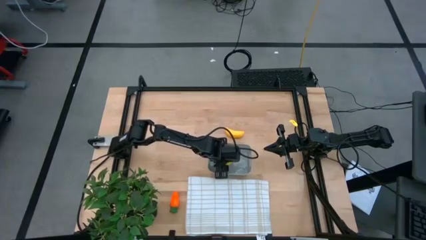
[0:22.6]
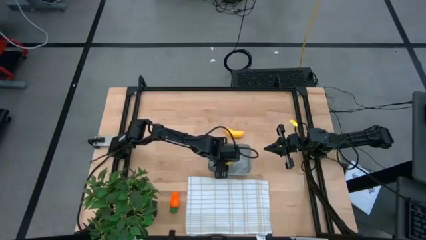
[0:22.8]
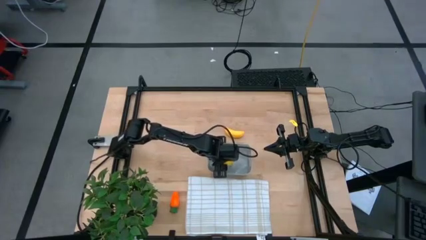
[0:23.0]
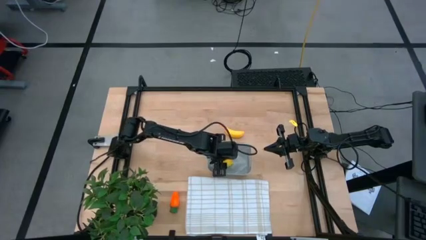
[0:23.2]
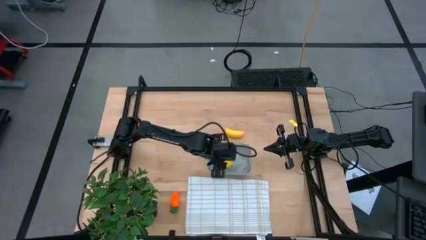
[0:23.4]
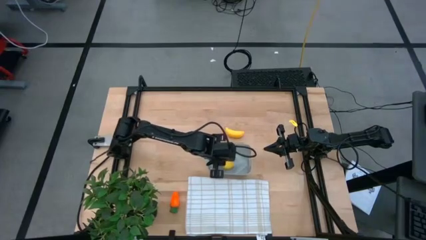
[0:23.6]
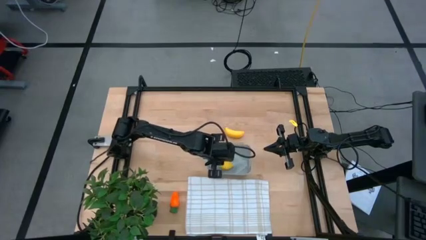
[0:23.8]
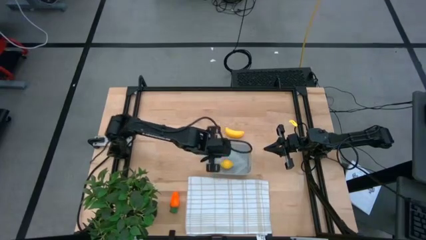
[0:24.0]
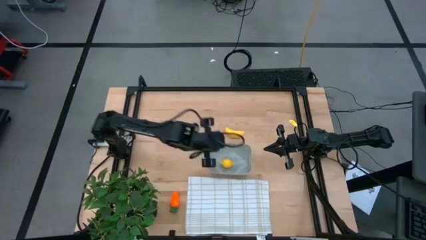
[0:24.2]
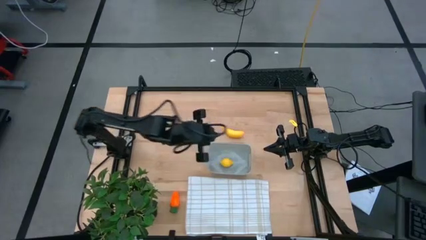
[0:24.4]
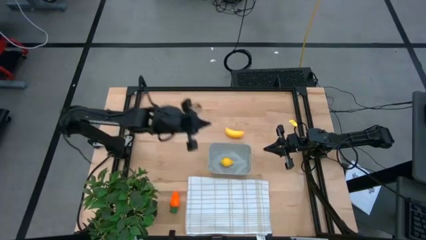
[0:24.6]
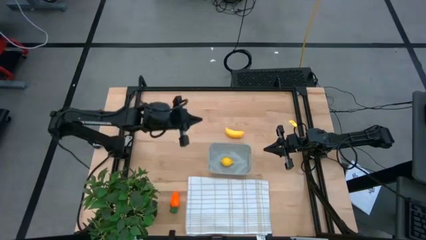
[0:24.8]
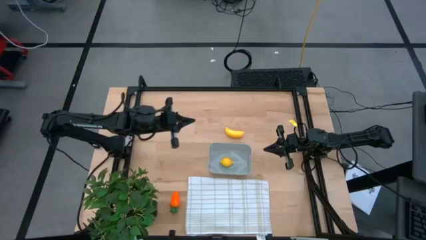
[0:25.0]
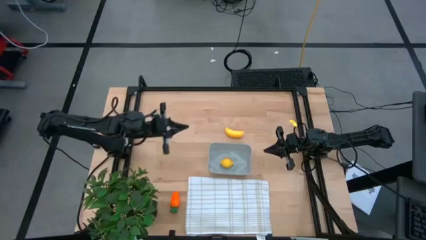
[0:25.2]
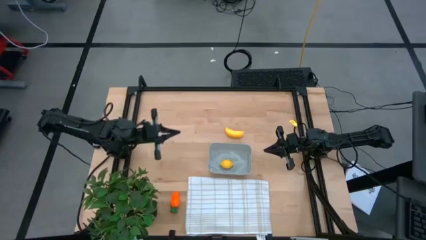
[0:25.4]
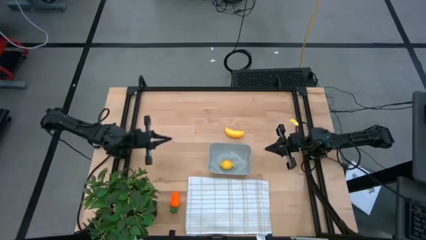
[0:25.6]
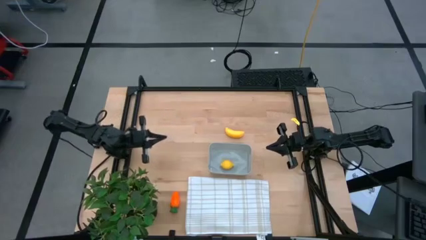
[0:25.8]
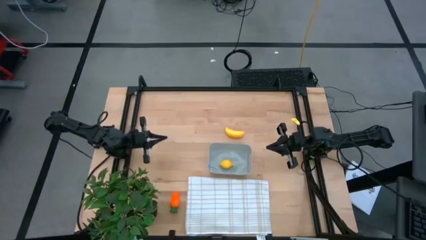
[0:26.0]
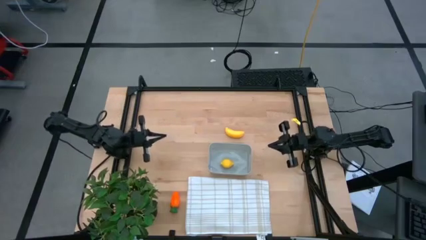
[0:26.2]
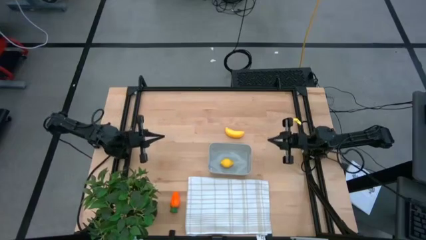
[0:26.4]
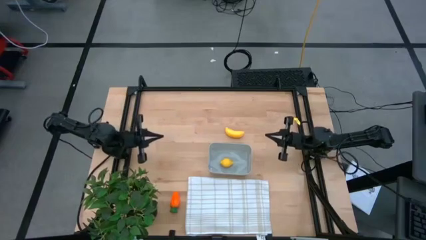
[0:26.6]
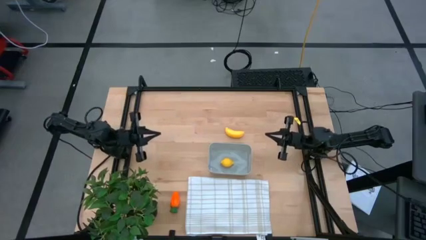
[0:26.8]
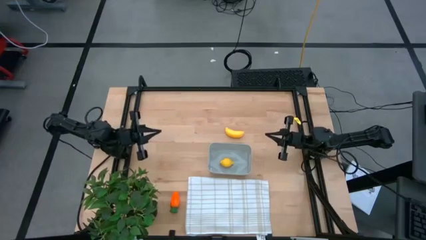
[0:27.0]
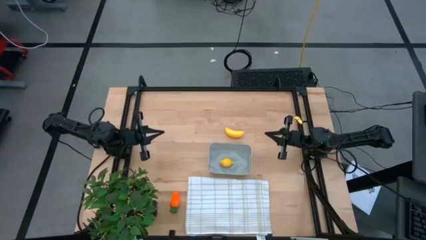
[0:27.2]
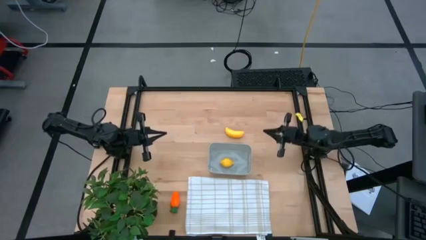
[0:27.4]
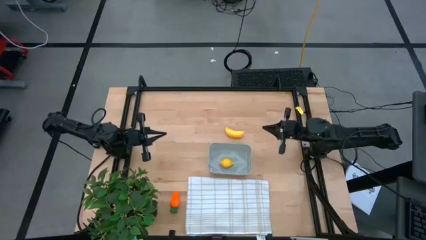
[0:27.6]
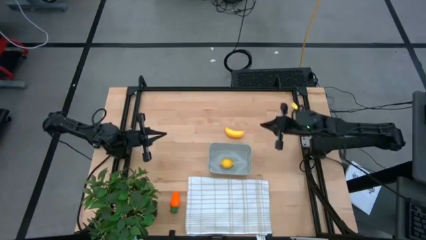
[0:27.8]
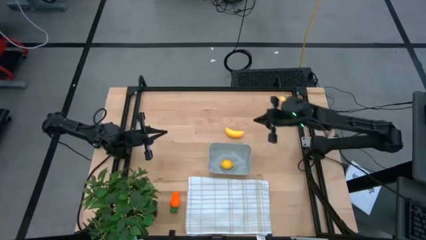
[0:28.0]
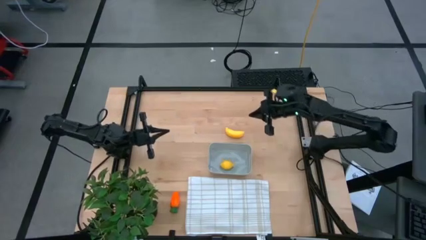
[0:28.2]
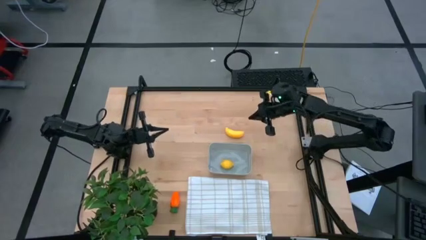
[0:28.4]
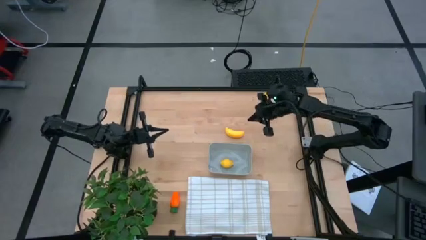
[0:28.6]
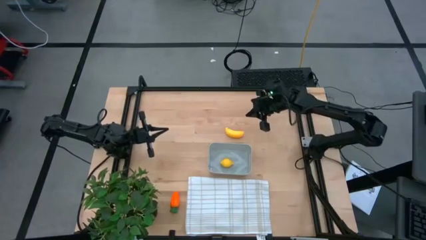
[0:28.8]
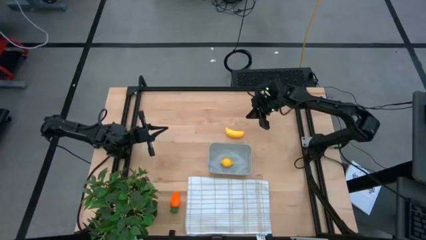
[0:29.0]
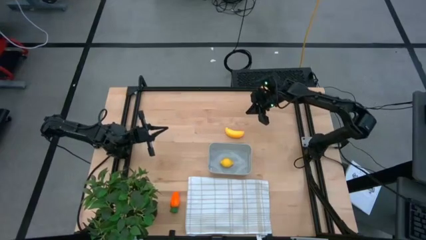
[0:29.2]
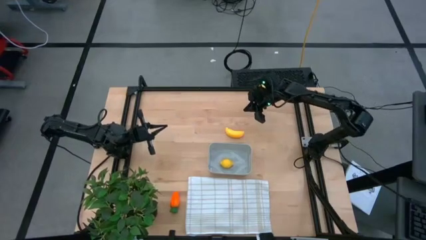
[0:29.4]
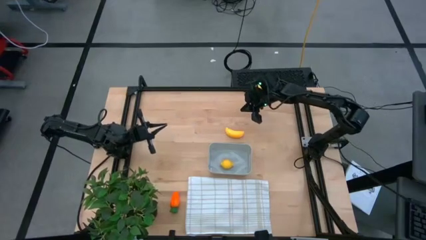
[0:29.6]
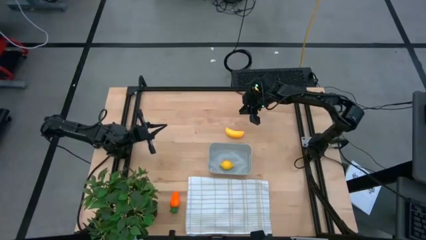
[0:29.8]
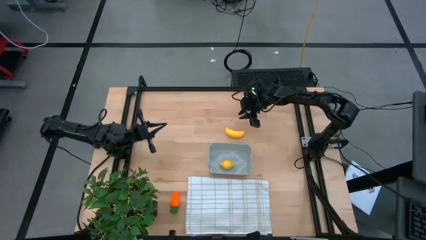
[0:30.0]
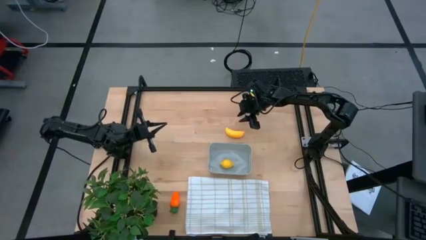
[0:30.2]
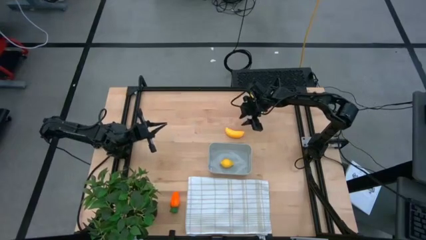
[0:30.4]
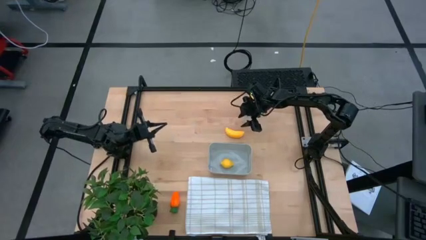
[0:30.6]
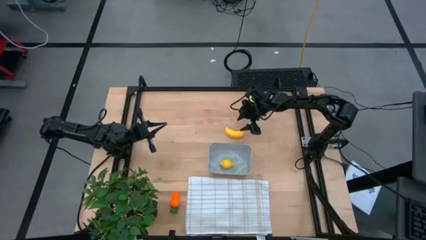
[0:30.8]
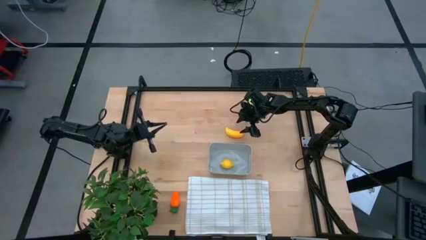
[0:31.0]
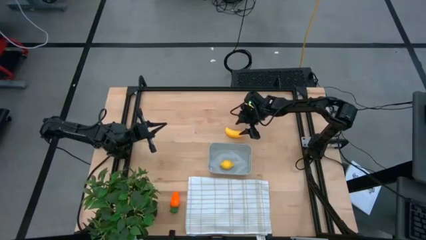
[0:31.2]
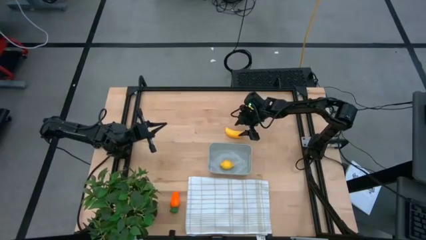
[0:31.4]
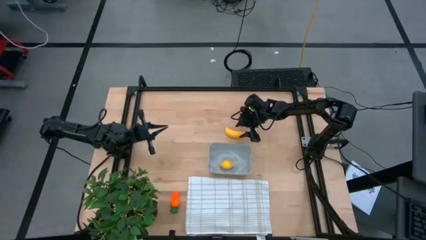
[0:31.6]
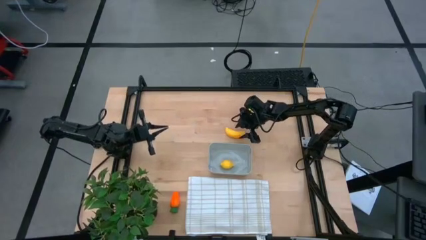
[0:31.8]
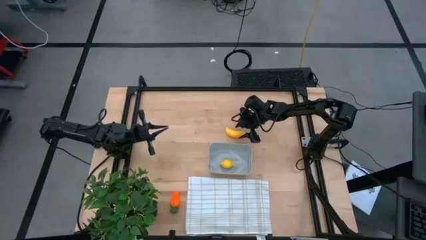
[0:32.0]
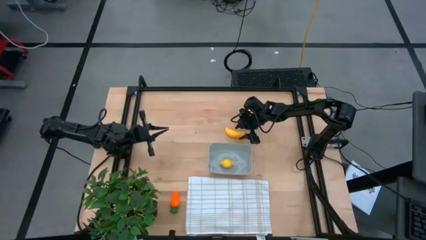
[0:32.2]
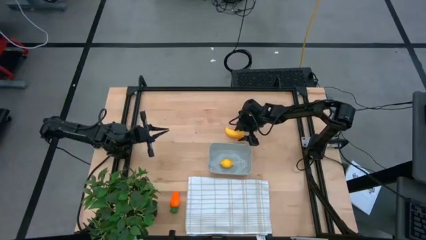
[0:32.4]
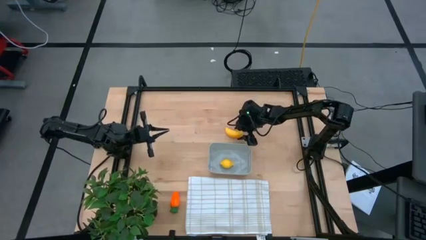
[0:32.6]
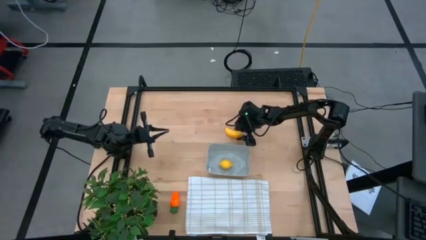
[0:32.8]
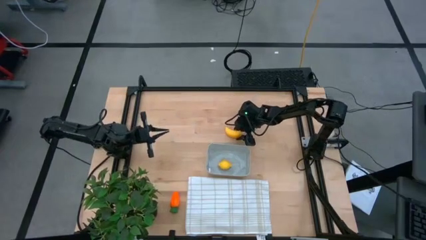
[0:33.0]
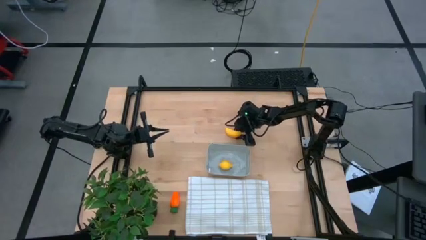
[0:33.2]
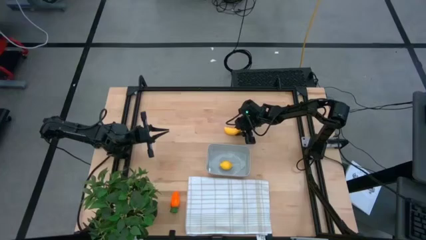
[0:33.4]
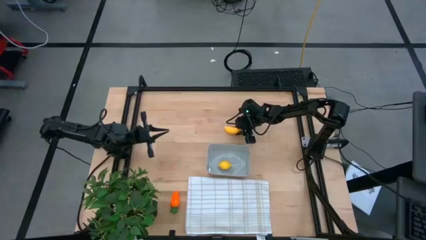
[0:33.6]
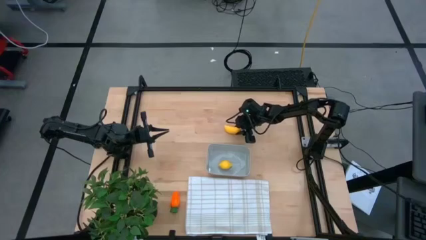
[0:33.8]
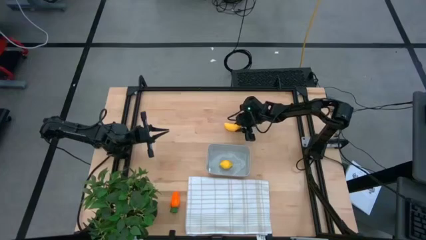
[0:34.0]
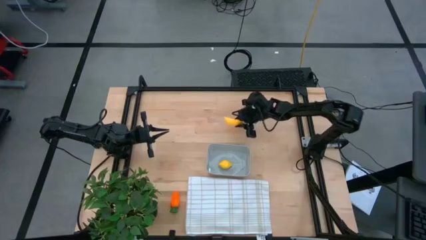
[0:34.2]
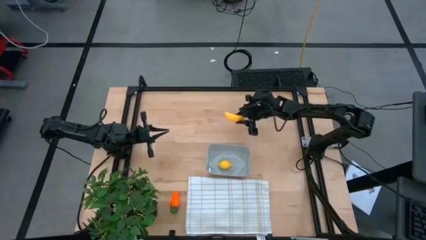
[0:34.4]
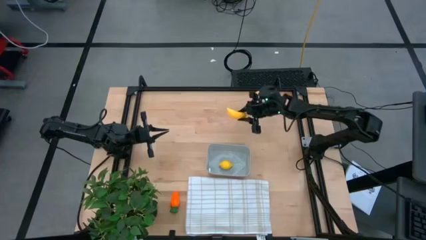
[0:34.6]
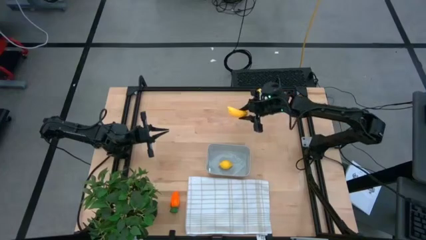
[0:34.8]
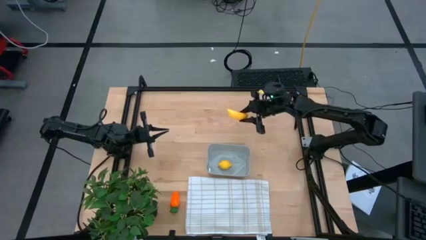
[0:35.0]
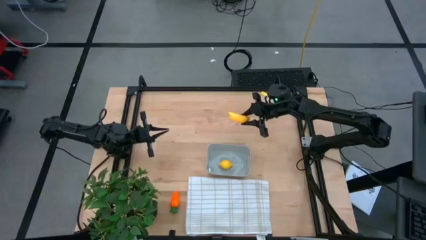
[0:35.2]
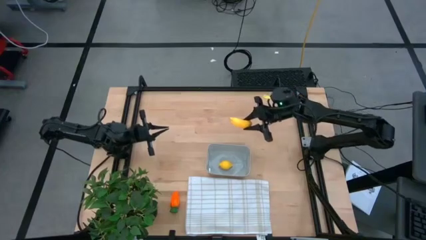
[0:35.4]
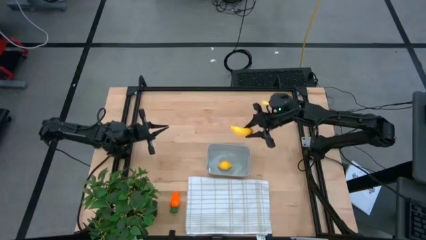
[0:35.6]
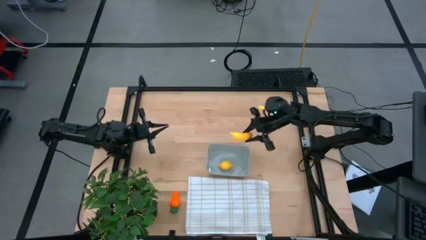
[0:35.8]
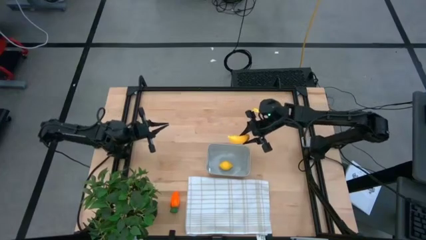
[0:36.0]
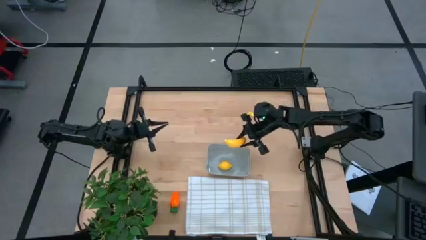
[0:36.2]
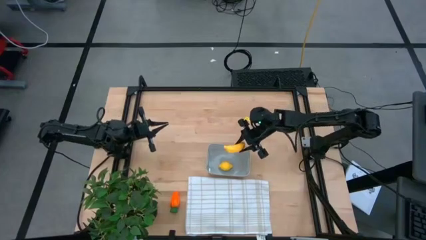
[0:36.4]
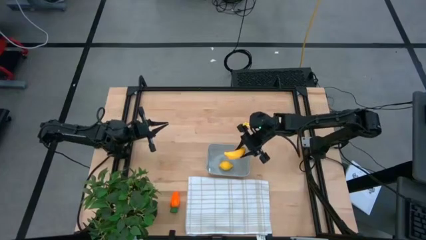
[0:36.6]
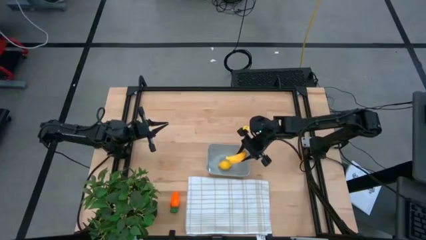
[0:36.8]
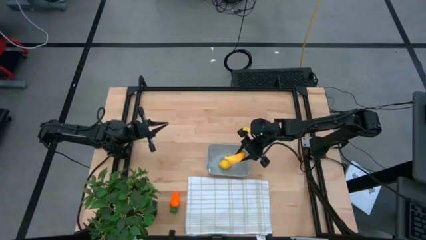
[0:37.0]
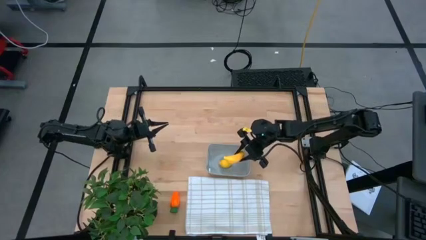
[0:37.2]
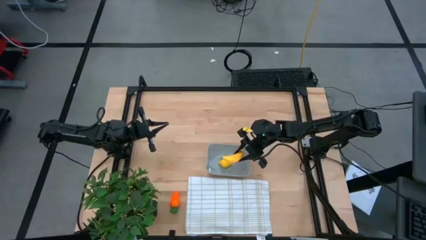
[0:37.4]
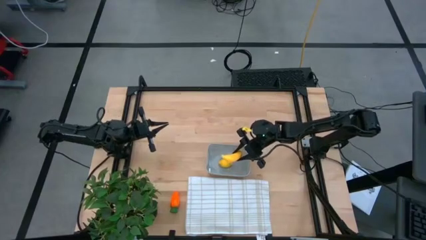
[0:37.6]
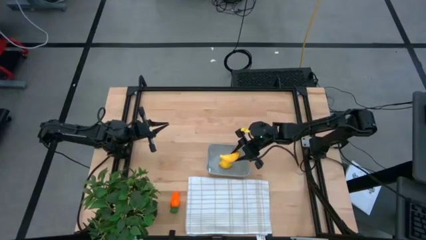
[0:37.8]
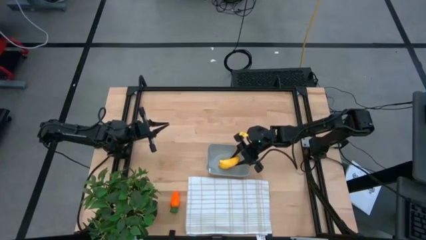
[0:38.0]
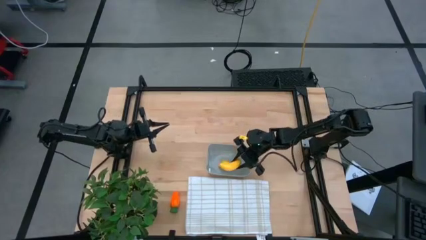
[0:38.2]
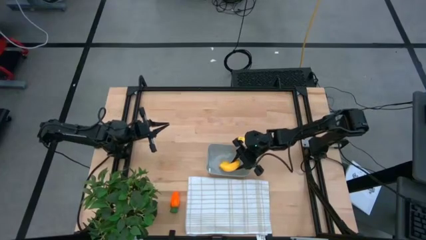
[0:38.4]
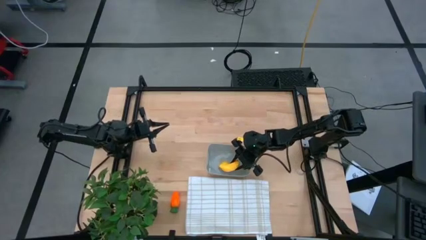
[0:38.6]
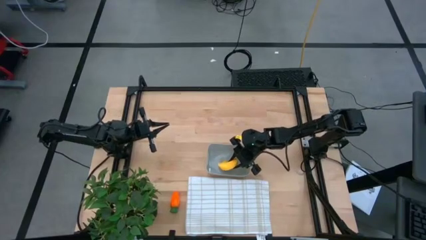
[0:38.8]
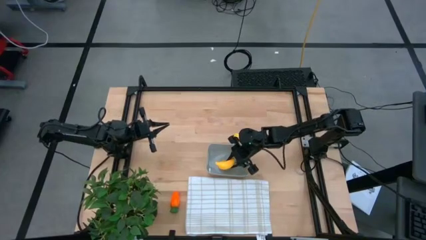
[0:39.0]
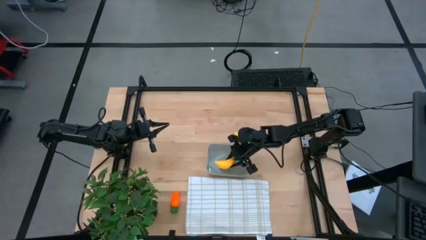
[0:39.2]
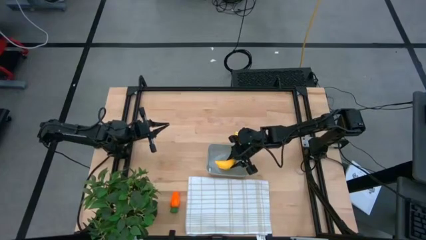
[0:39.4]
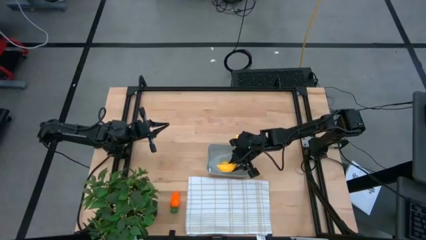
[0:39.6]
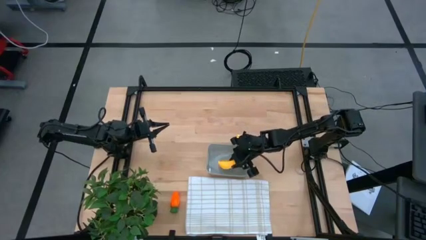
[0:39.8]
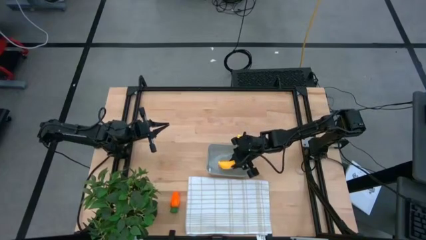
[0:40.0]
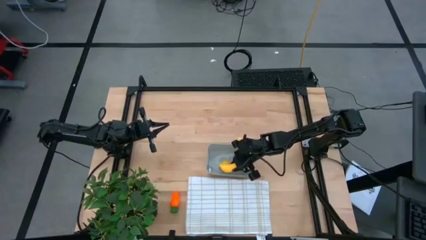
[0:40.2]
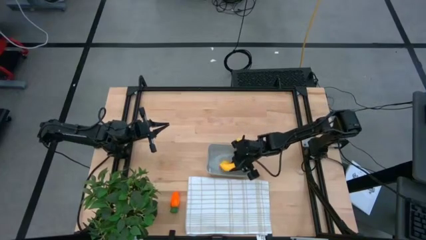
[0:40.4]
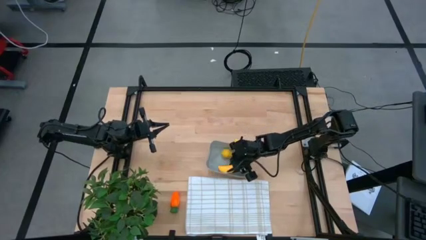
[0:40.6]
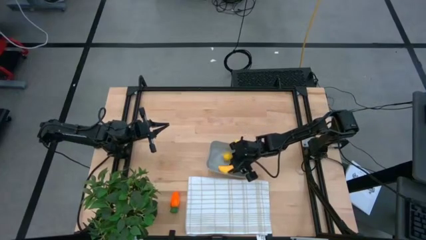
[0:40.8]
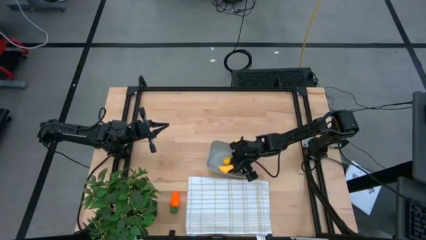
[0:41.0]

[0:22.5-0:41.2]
Task: Pick and placing Produce into tupperware
Put the yellow banana into the bin
